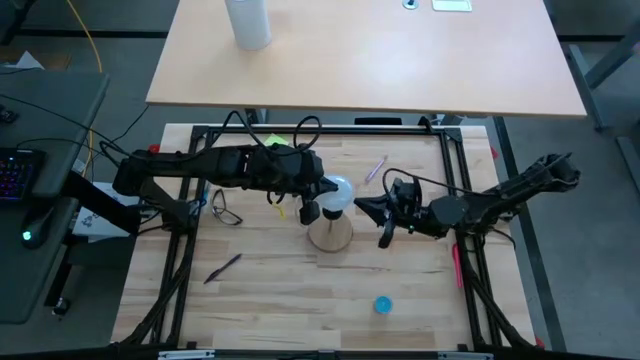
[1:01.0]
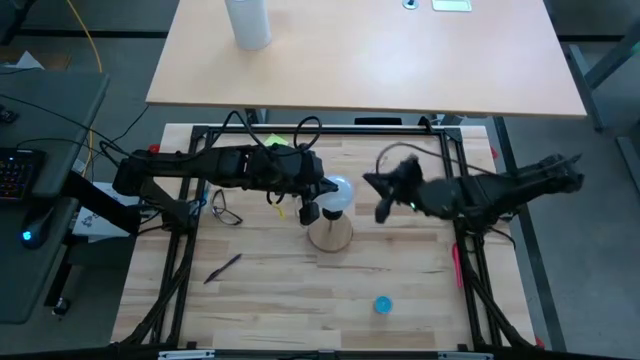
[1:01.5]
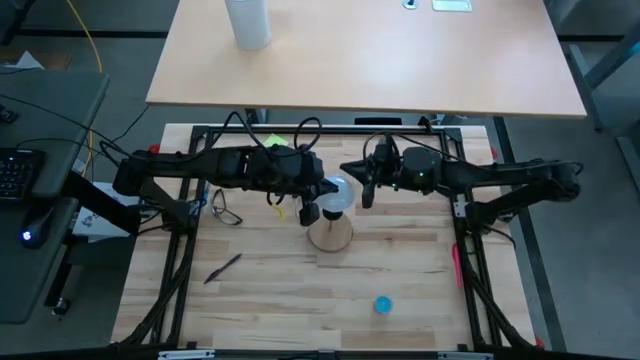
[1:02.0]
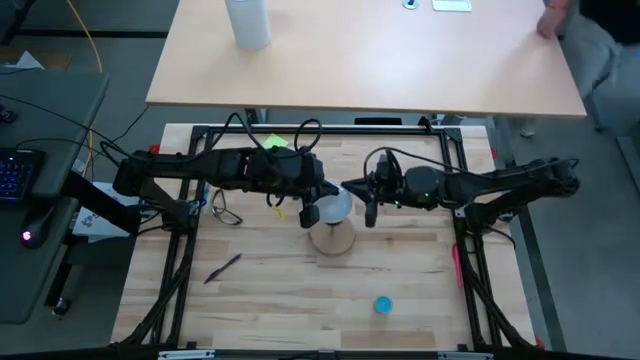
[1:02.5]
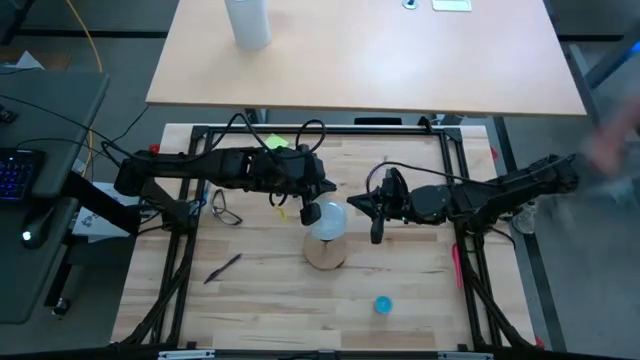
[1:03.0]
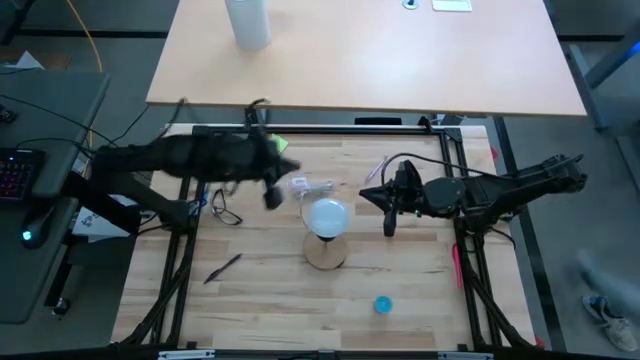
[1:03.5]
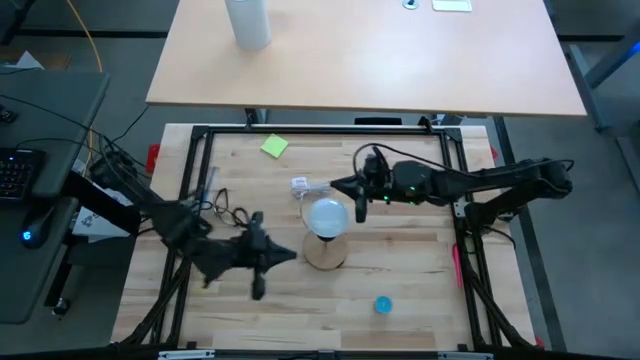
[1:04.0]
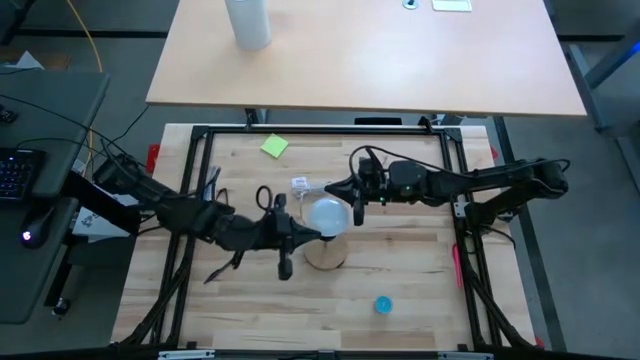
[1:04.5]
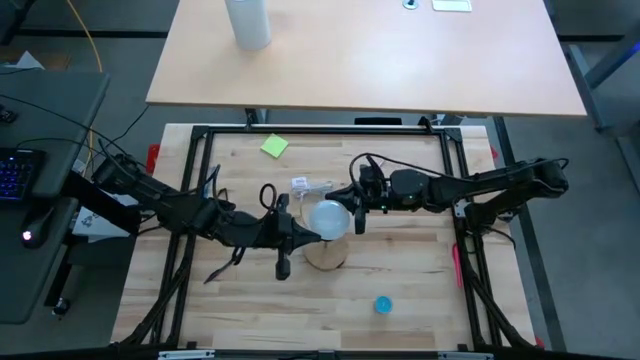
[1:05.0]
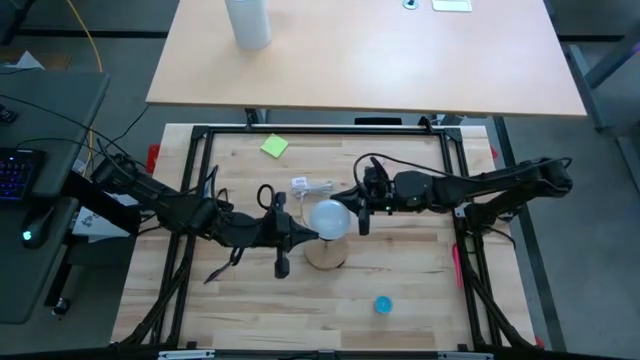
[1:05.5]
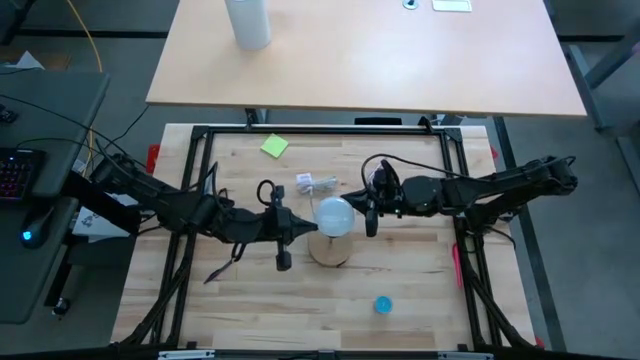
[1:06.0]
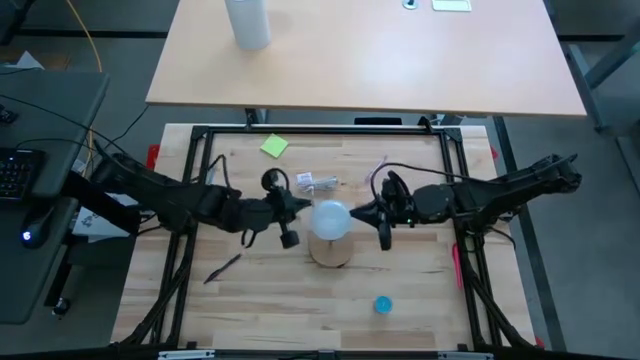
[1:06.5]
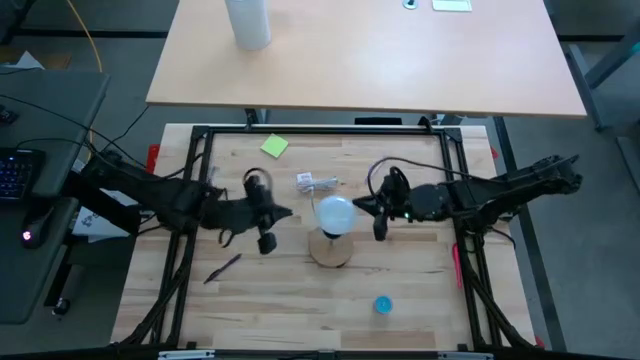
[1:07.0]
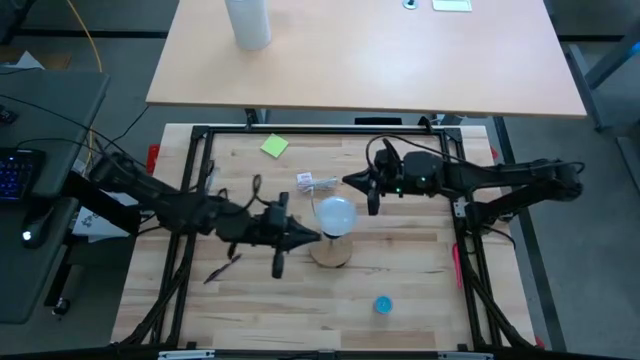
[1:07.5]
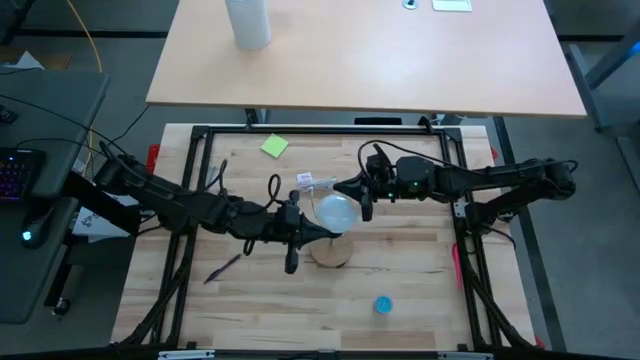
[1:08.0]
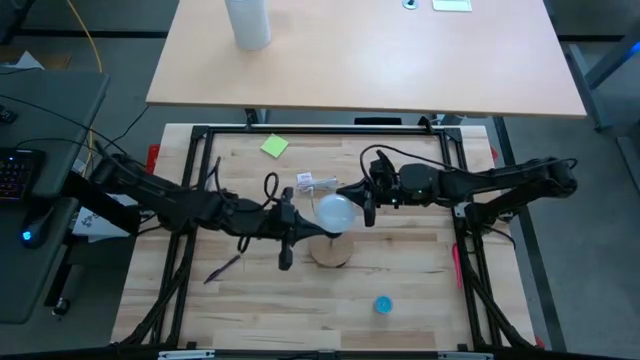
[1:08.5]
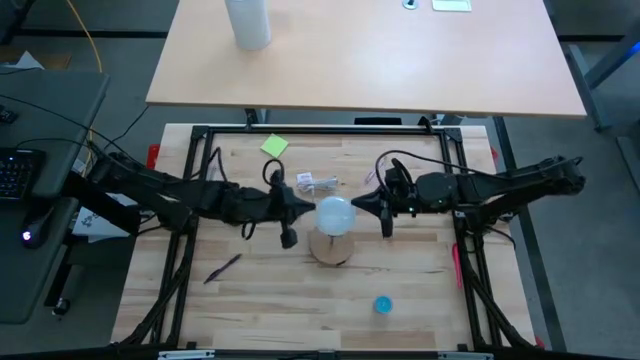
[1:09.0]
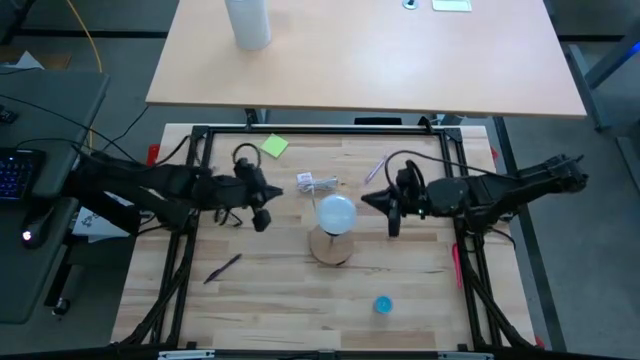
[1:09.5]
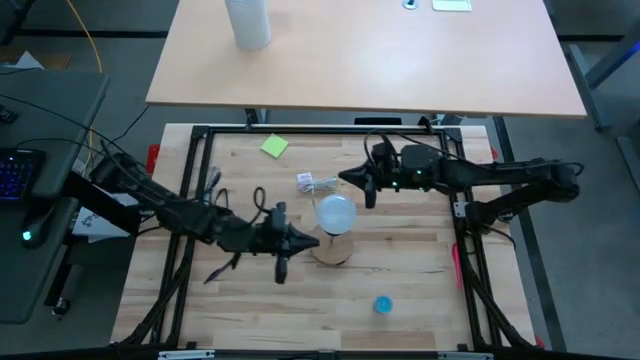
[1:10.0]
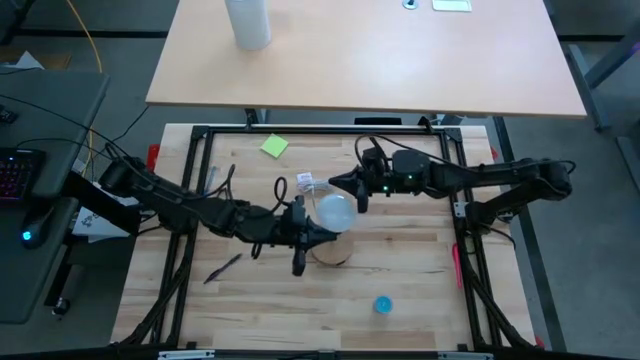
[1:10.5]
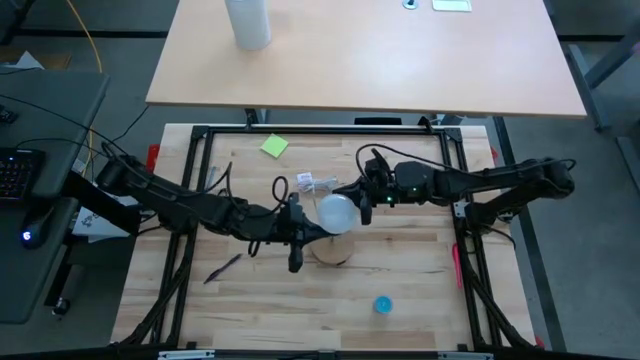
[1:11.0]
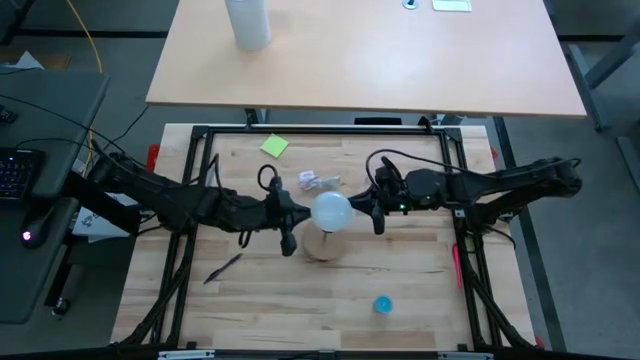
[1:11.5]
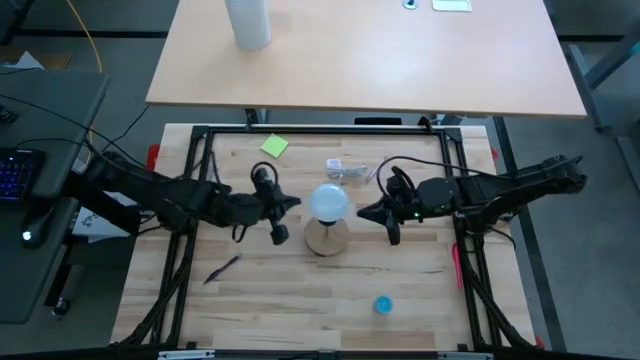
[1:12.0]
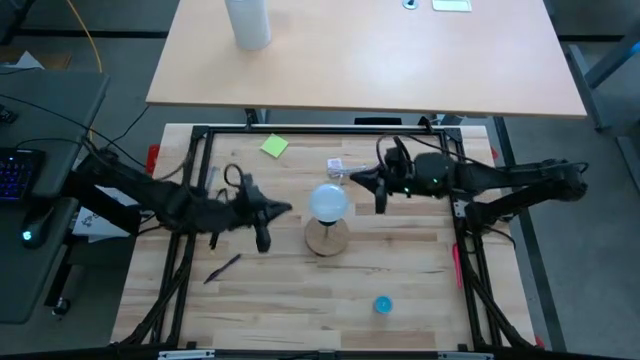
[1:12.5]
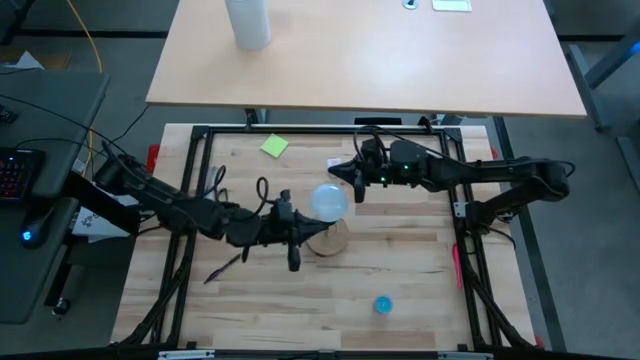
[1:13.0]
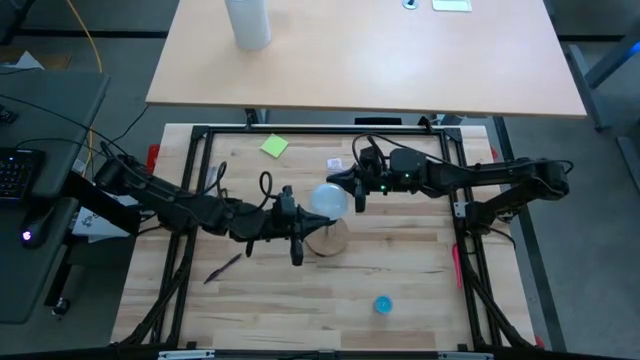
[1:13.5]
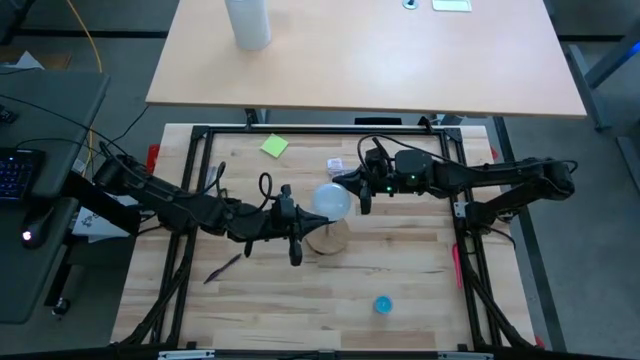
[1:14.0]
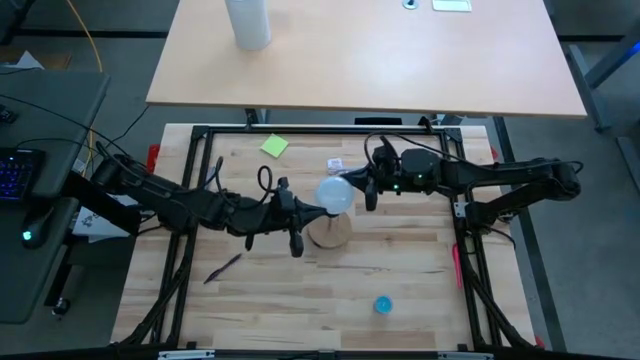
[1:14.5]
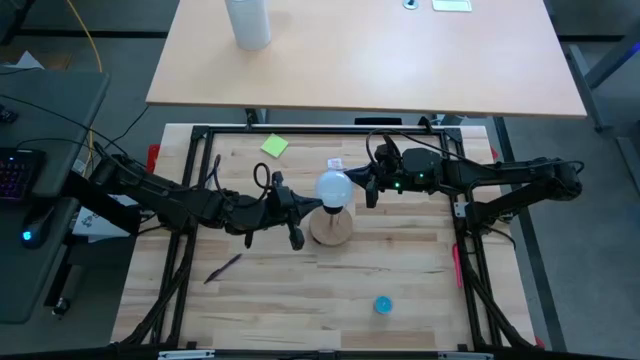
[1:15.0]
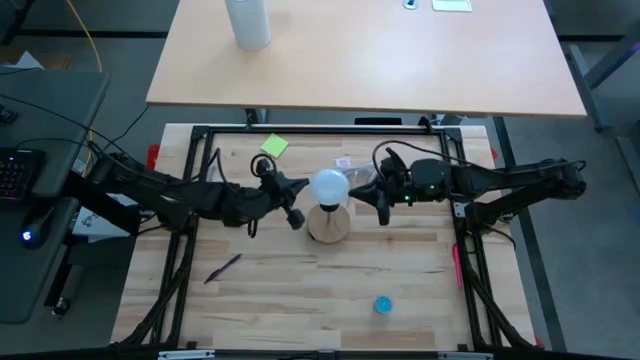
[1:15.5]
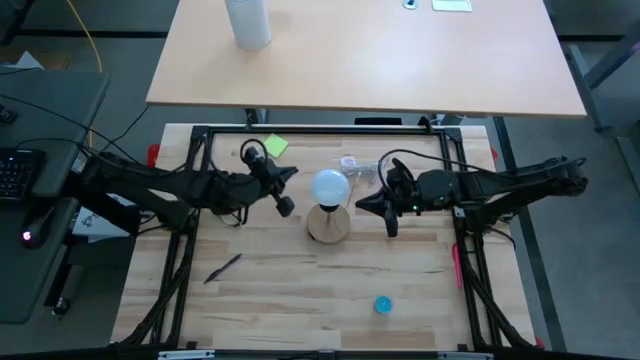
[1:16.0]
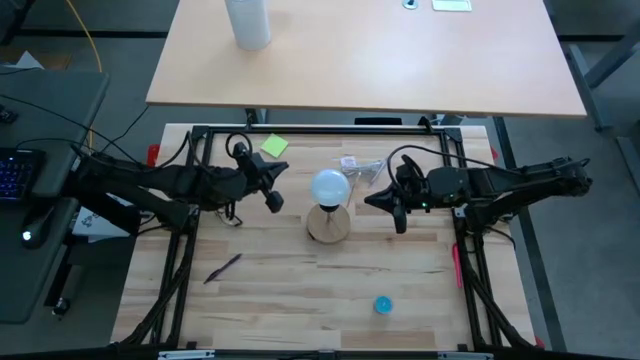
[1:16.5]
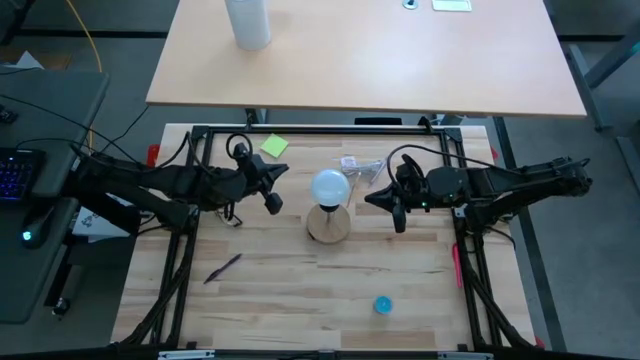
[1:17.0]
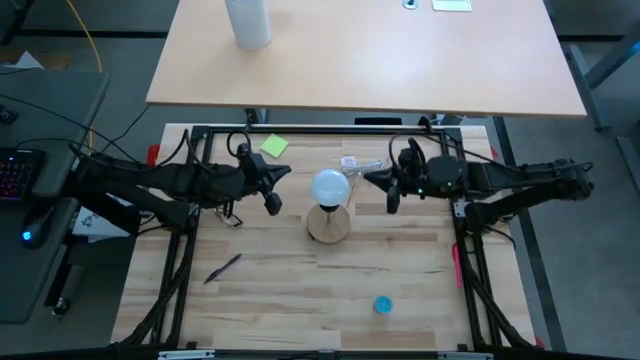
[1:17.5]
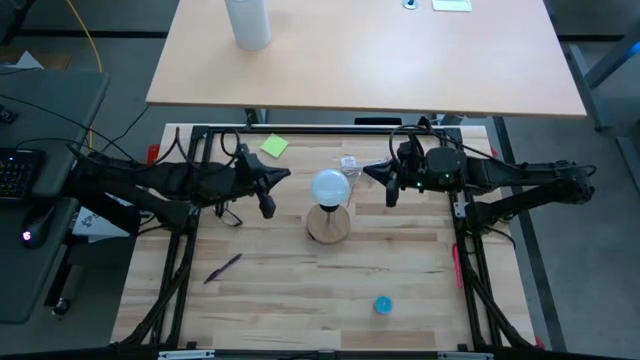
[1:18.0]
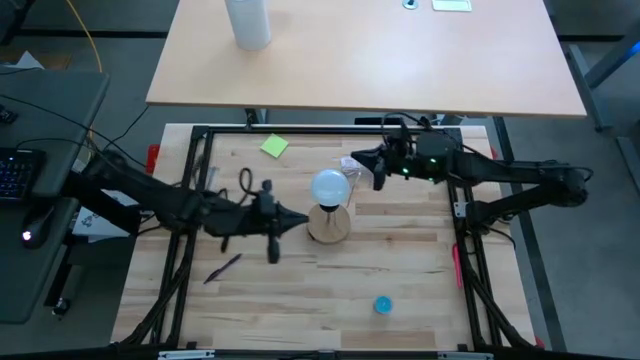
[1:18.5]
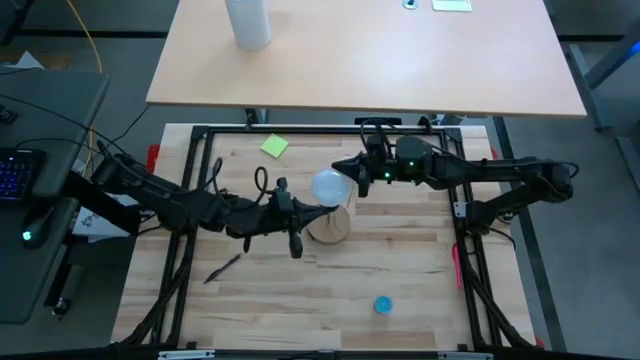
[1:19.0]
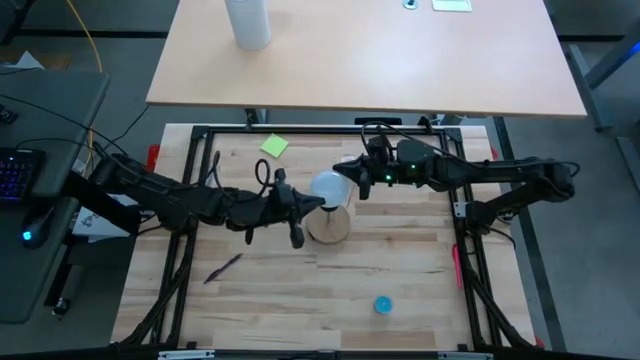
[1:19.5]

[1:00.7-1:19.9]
Task: Screw lightbulb
Insert the lightbulb into the lamp
